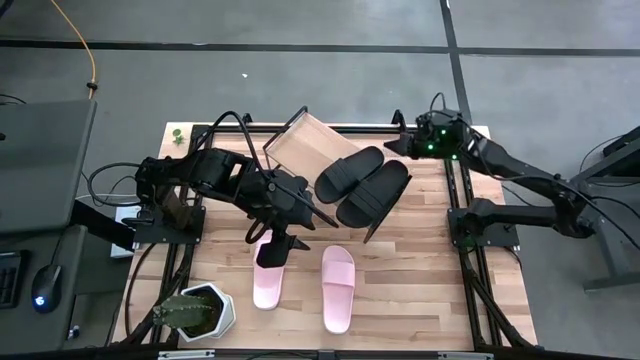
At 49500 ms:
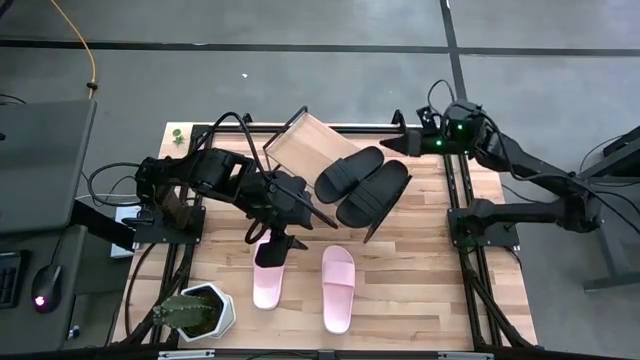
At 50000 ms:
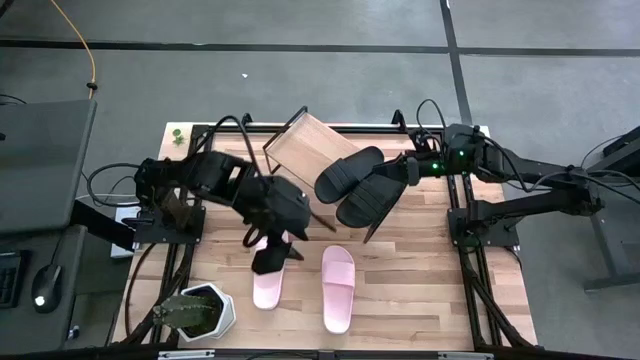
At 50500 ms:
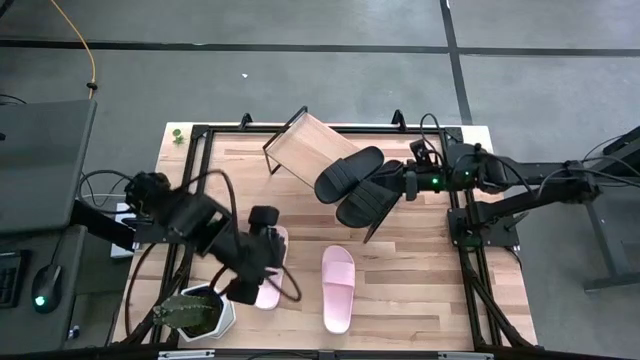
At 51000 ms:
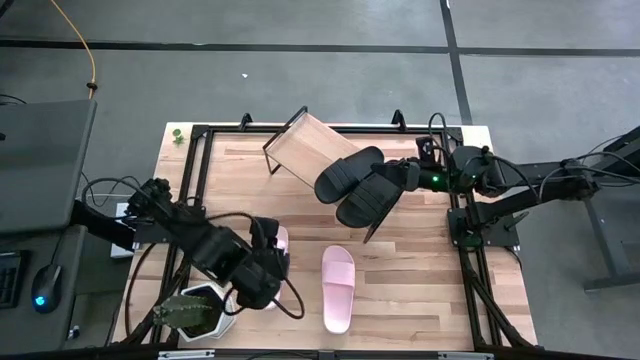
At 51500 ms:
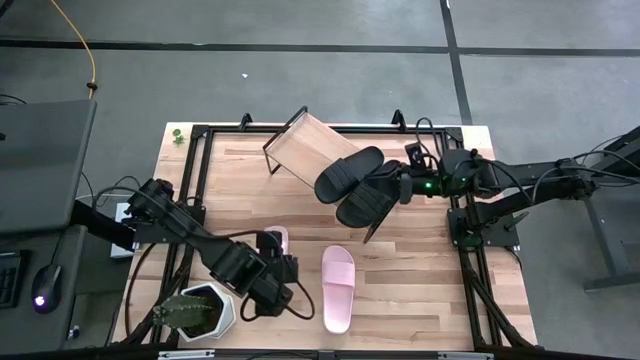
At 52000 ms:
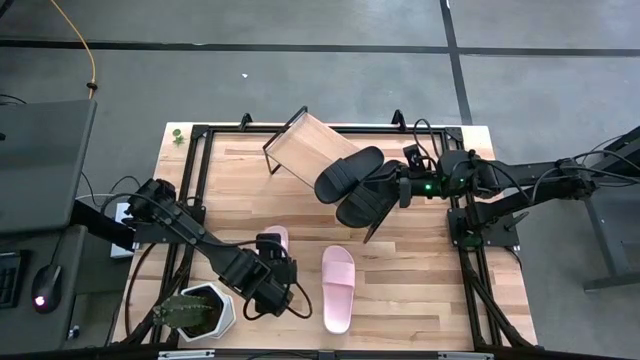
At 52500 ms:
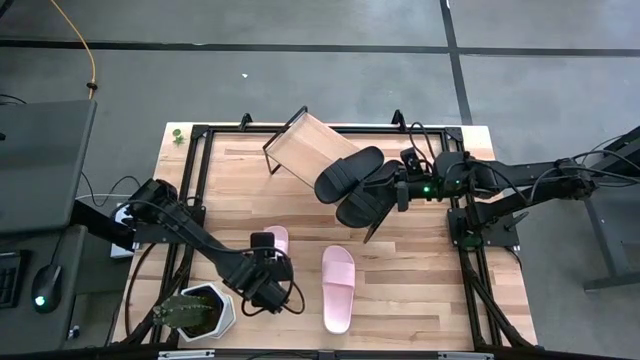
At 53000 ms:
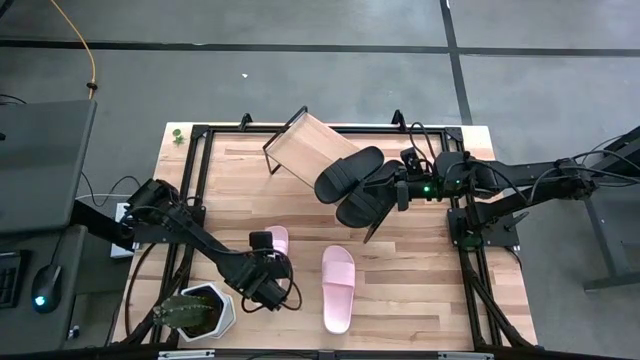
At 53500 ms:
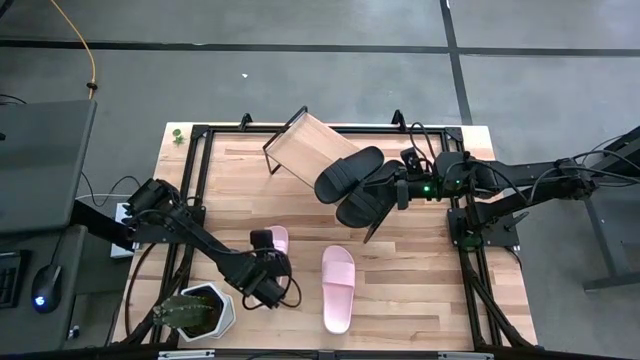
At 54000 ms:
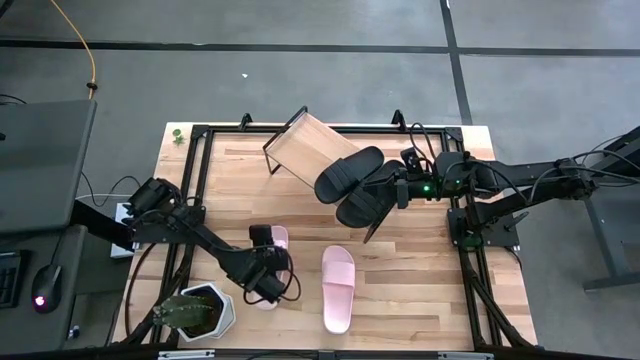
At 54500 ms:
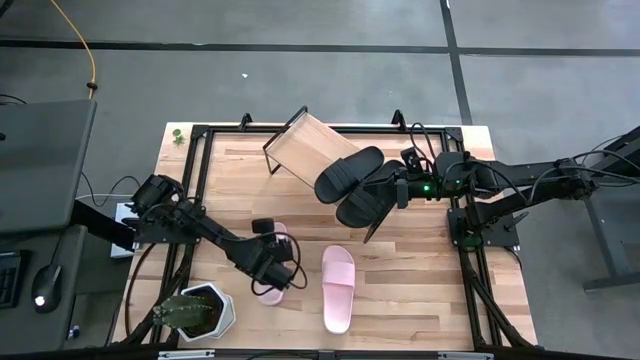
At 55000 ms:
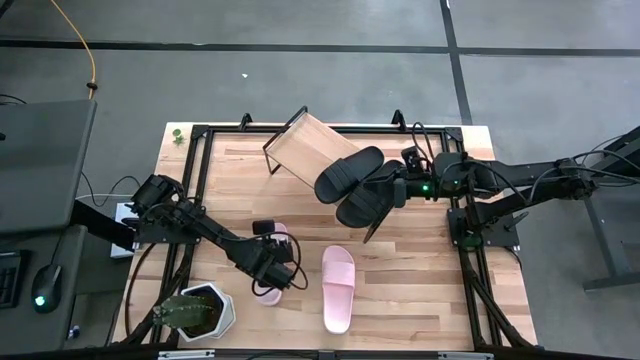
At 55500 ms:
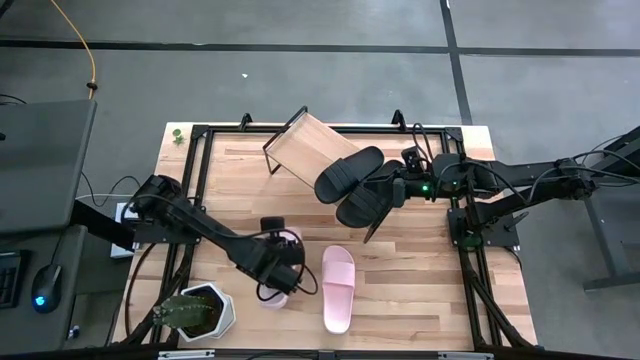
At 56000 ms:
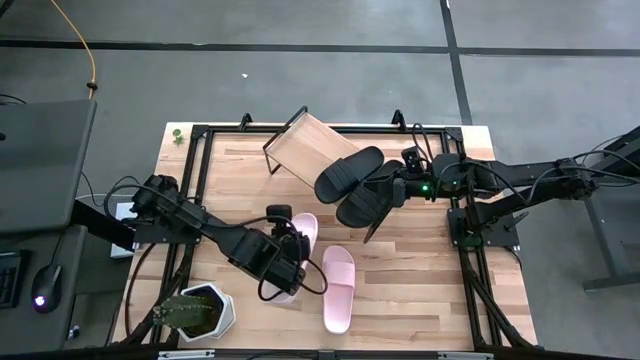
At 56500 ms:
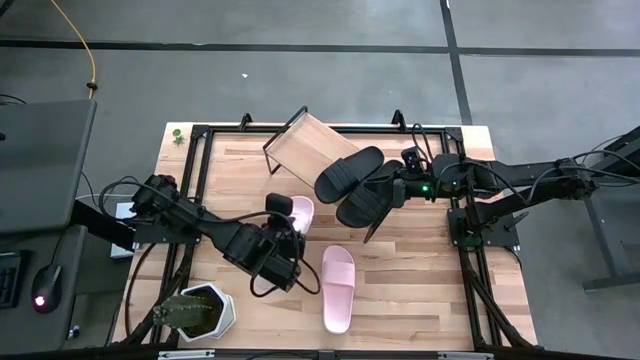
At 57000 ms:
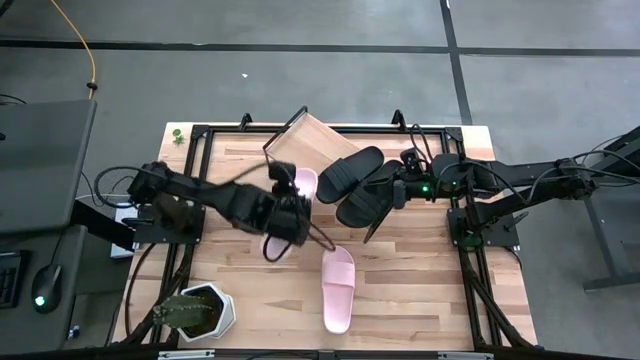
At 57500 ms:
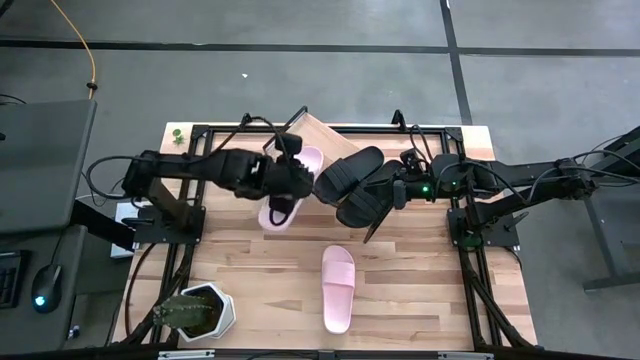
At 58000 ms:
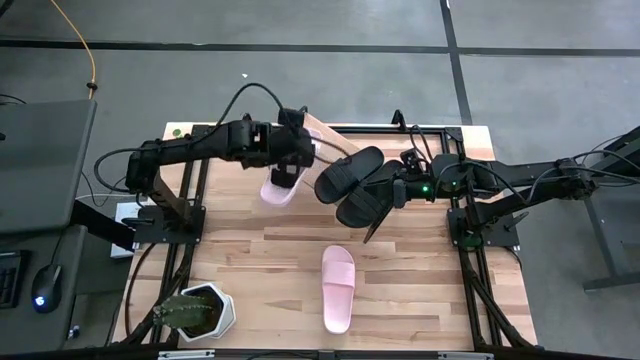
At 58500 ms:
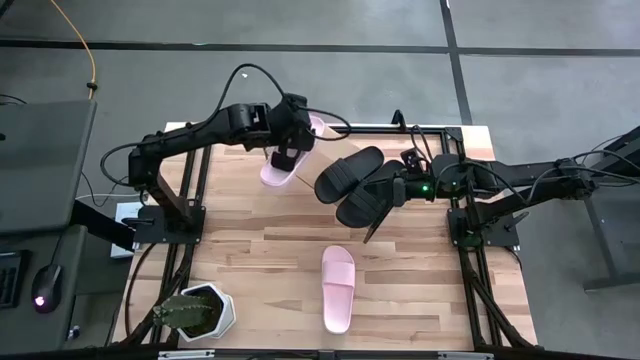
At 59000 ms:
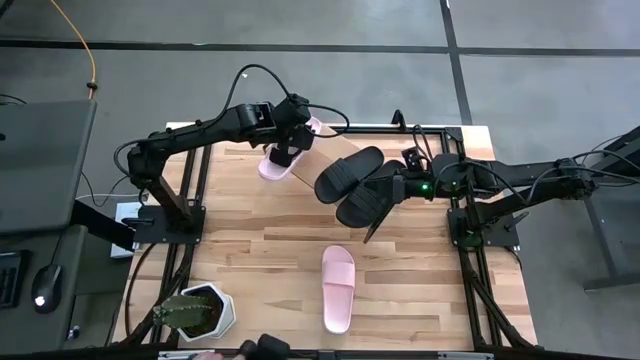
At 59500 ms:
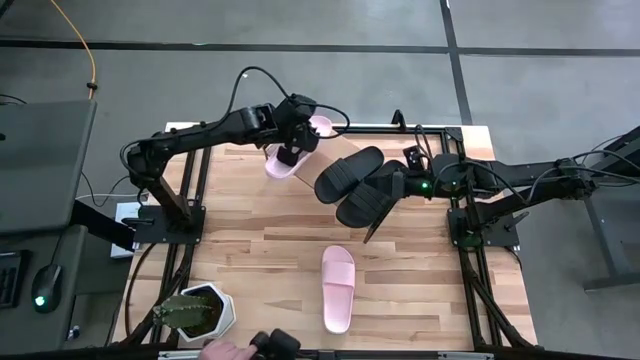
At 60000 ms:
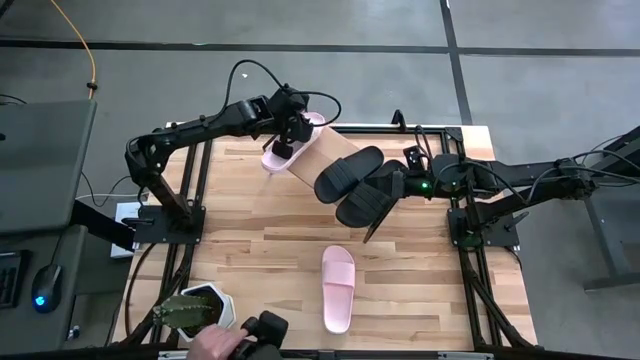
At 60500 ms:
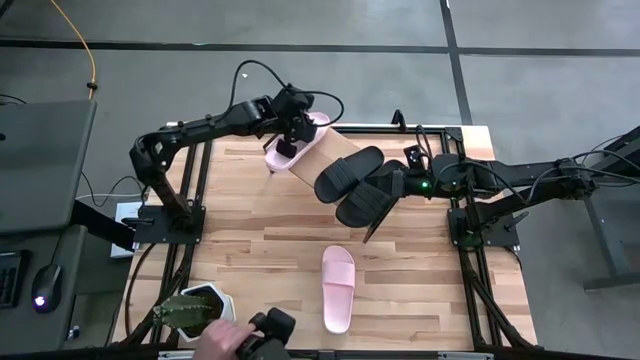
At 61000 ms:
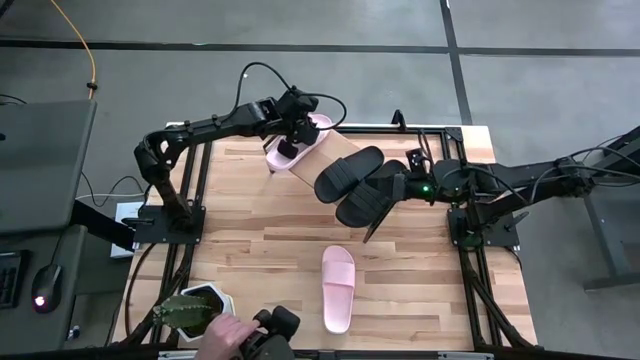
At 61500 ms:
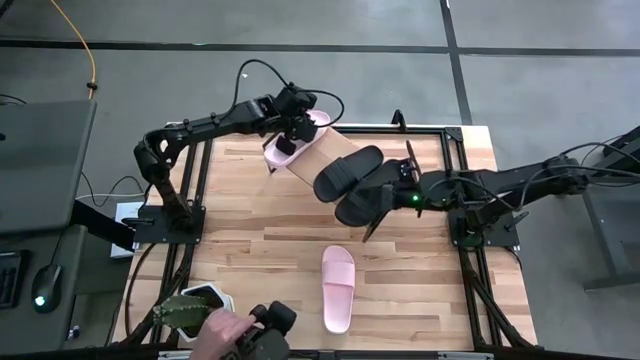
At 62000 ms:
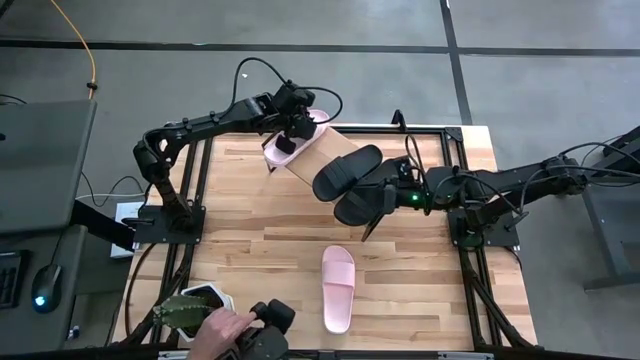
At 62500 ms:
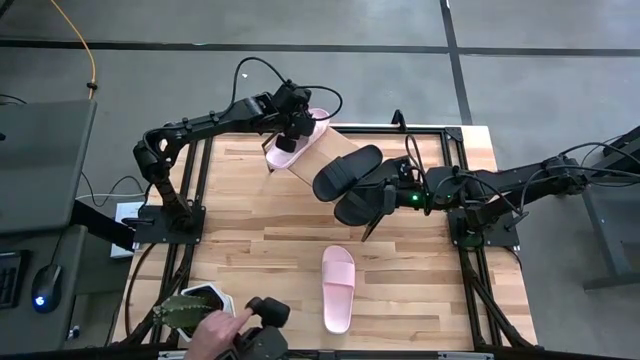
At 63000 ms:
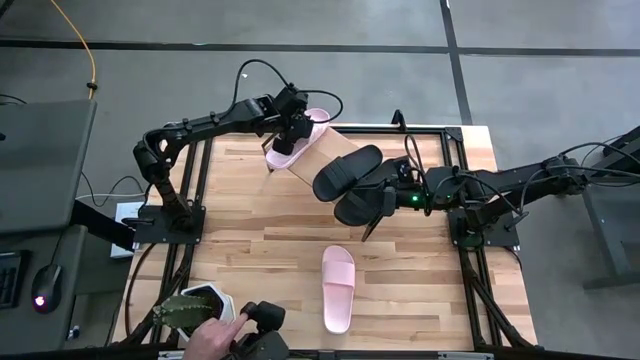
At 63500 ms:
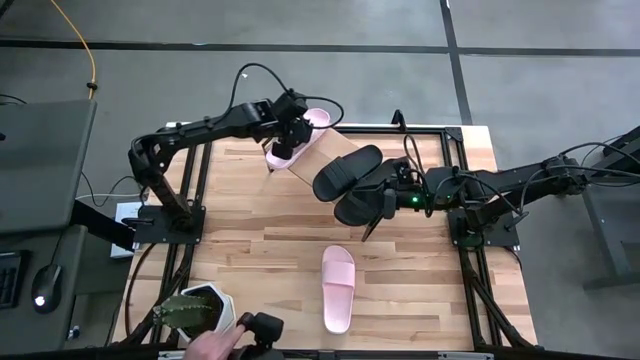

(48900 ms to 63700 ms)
Task: Pick and place slides into the shelf
Put the left pink slide on the shelf

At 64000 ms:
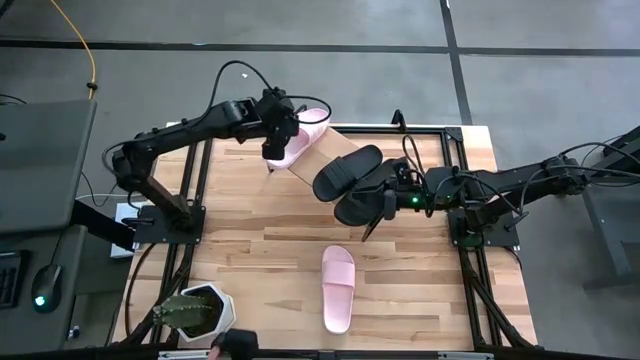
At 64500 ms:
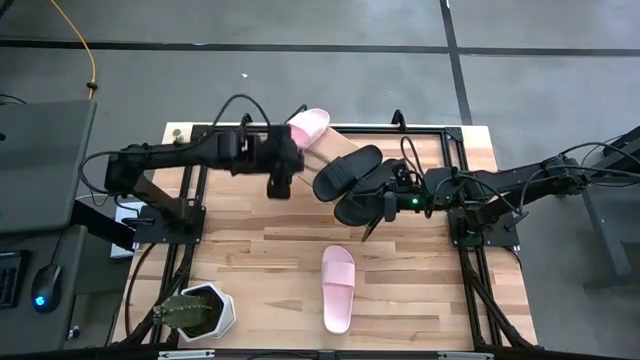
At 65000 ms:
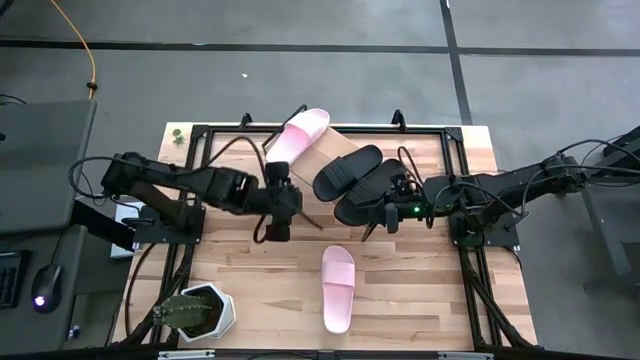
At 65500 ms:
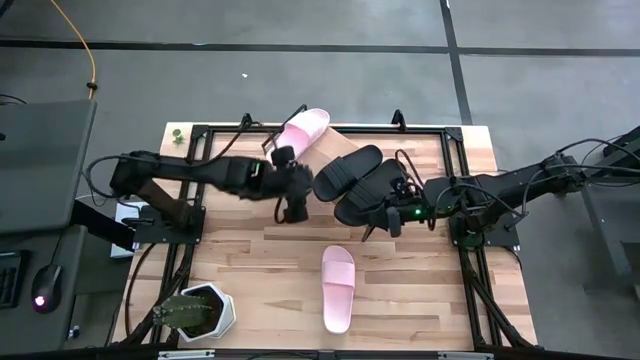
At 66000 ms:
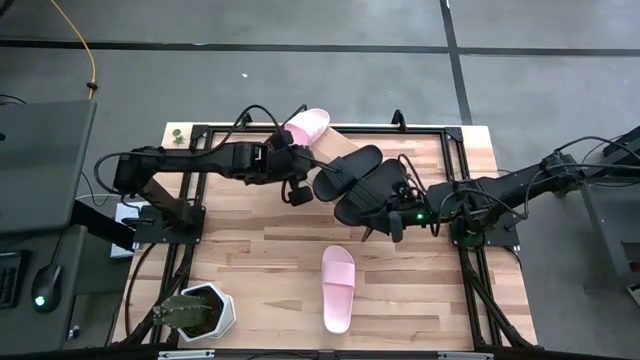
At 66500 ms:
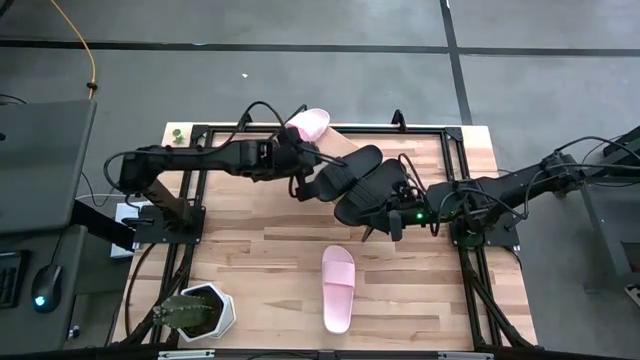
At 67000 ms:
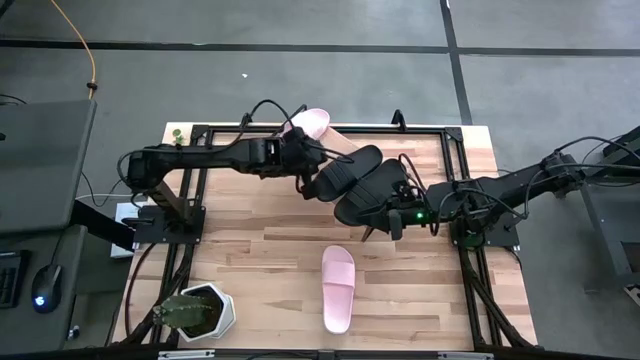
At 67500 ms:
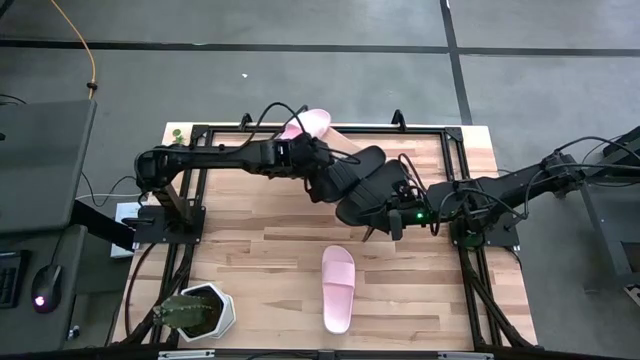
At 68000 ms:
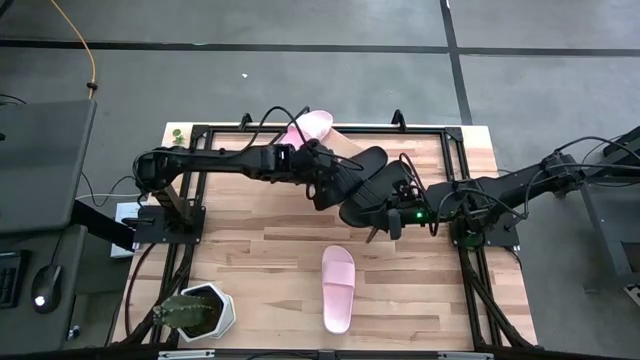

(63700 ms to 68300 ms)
Adjust the black slide

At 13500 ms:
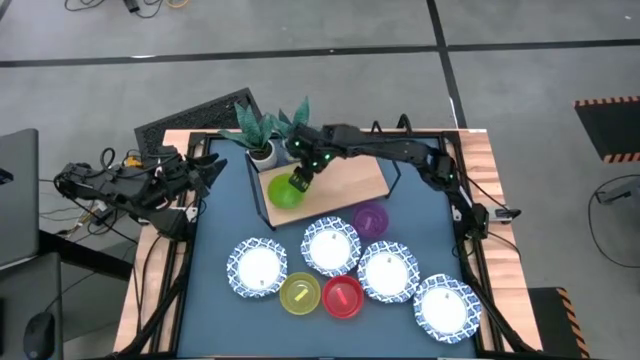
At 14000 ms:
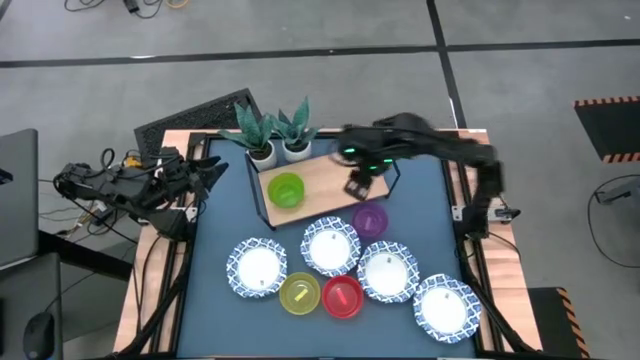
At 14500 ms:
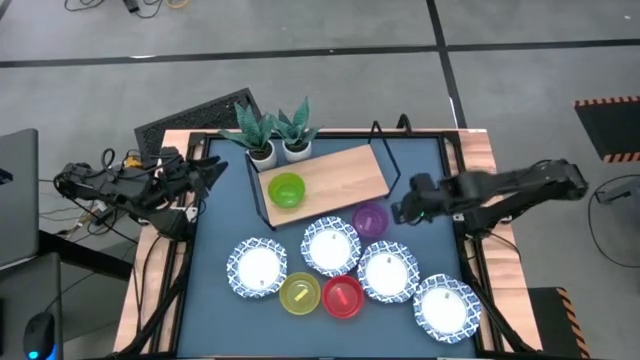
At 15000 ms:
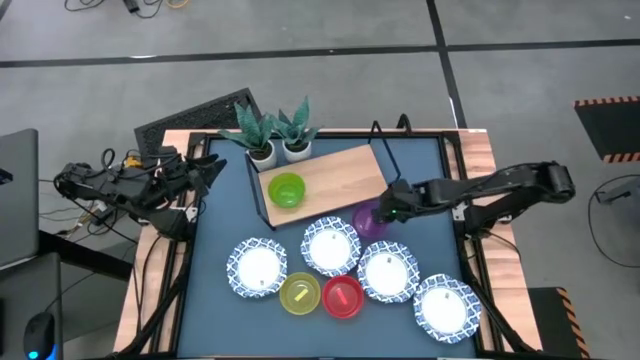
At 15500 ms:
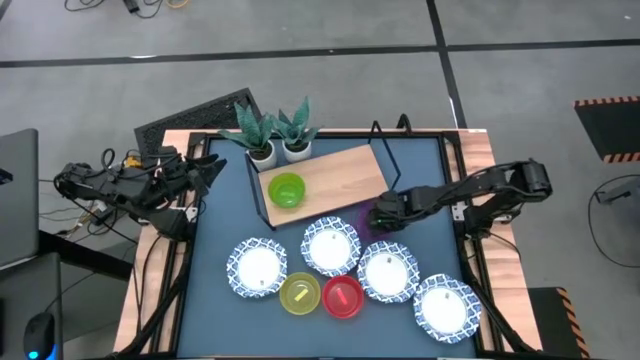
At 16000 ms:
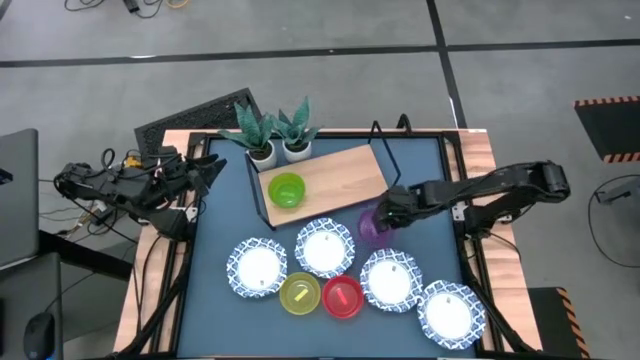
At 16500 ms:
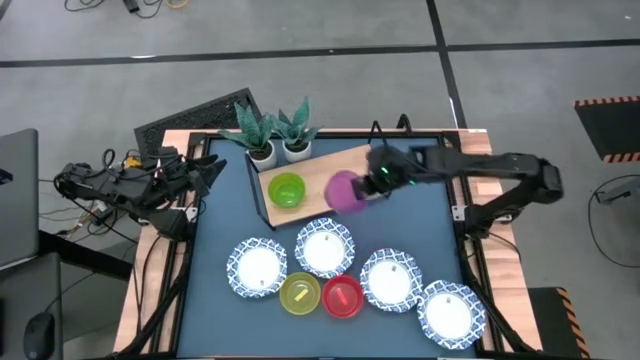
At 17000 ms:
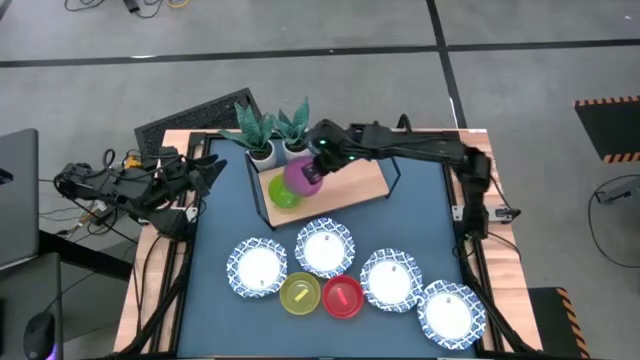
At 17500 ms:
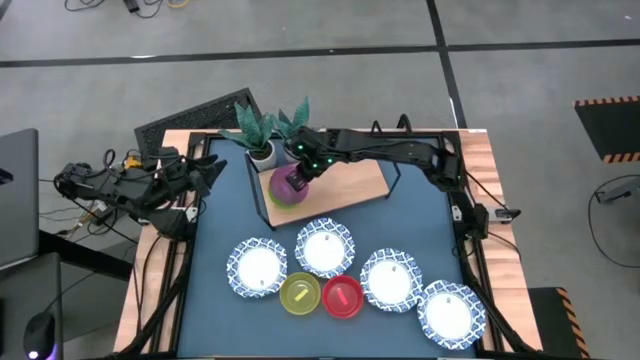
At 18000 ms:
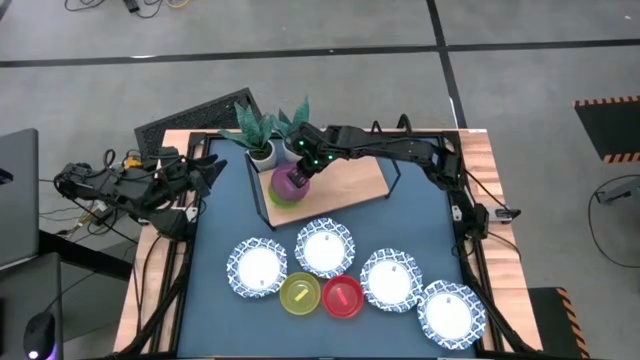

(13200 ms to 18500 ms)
Task: Place and stack bowls onto a shelf
Stack the purple bowl on top of the green bowl on the shelf
